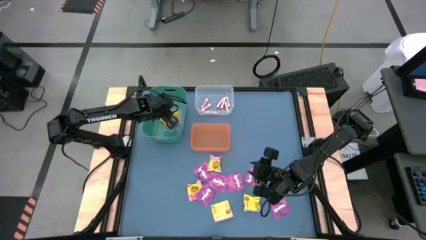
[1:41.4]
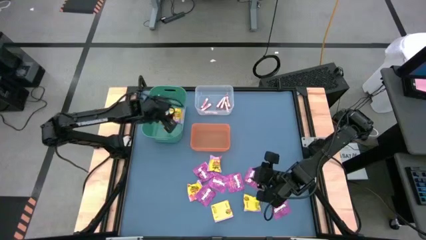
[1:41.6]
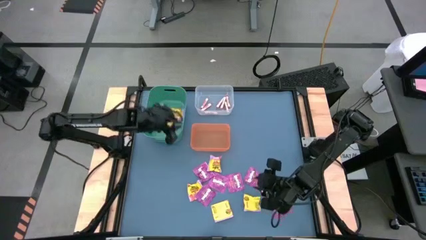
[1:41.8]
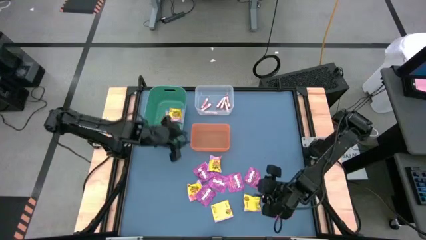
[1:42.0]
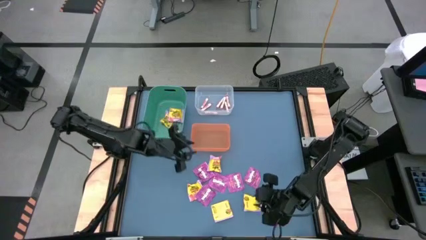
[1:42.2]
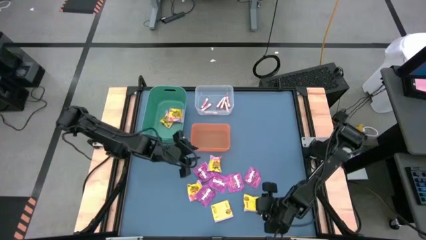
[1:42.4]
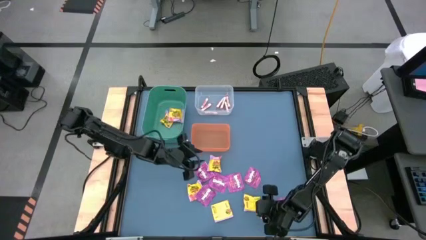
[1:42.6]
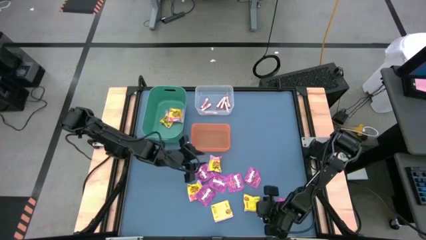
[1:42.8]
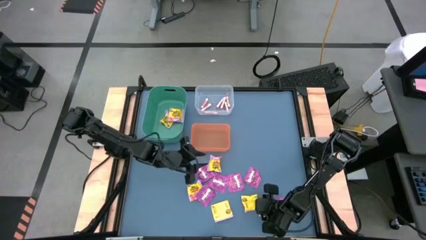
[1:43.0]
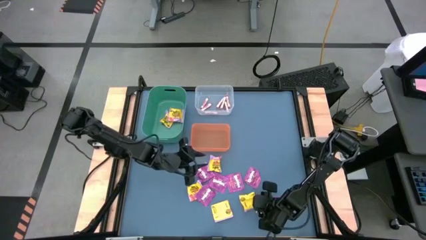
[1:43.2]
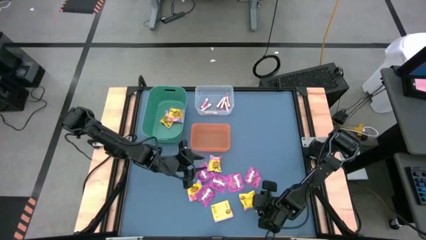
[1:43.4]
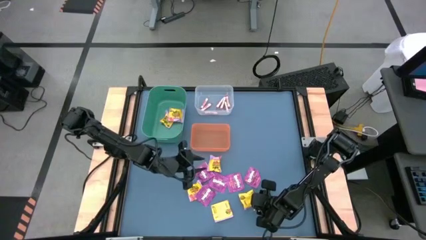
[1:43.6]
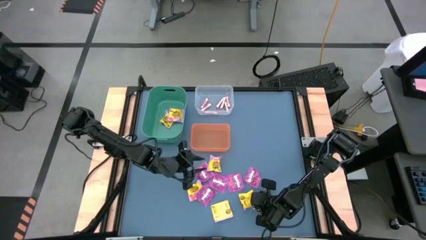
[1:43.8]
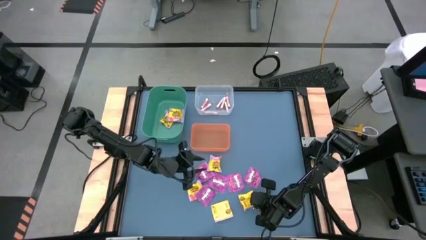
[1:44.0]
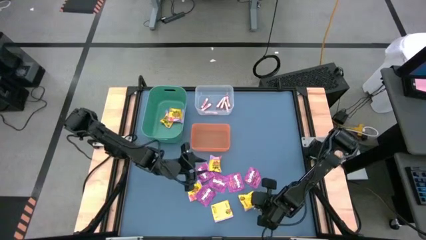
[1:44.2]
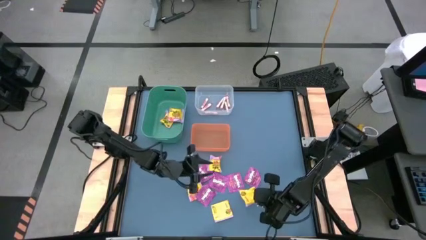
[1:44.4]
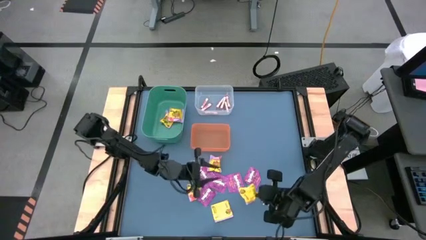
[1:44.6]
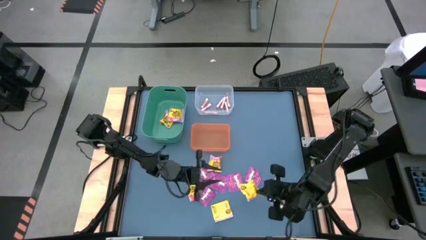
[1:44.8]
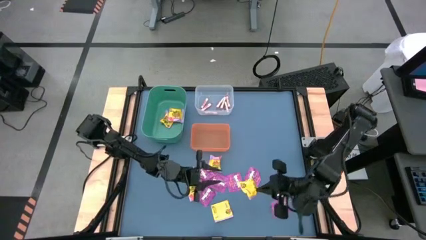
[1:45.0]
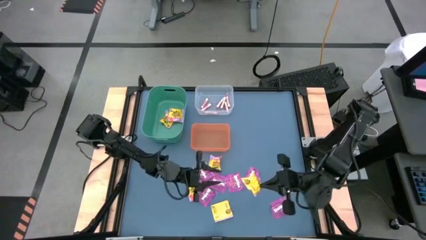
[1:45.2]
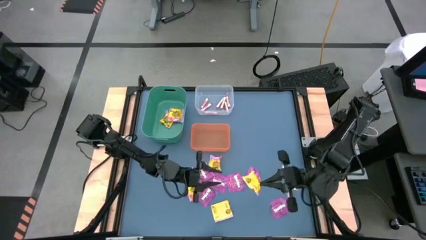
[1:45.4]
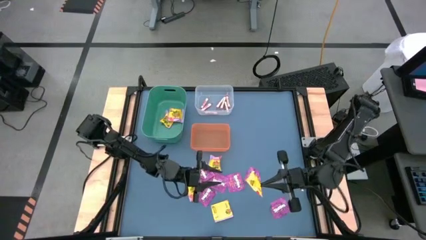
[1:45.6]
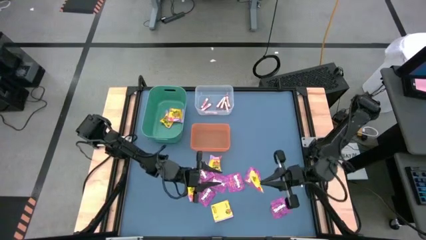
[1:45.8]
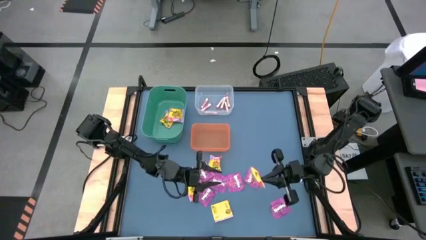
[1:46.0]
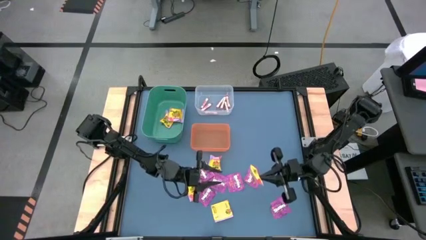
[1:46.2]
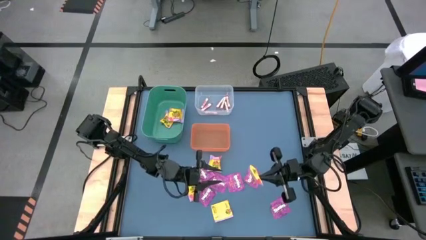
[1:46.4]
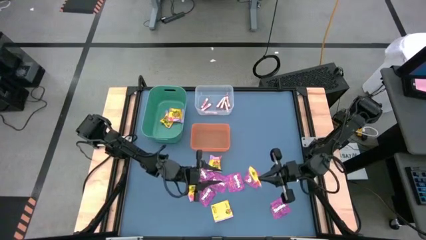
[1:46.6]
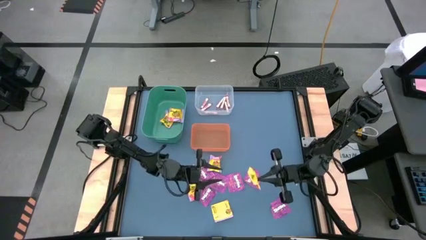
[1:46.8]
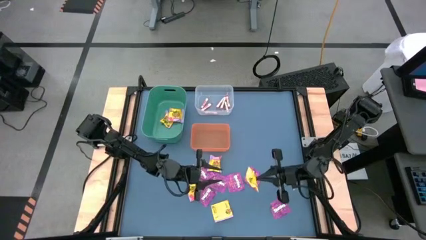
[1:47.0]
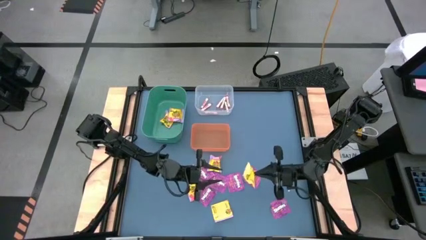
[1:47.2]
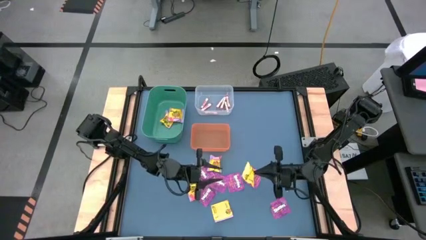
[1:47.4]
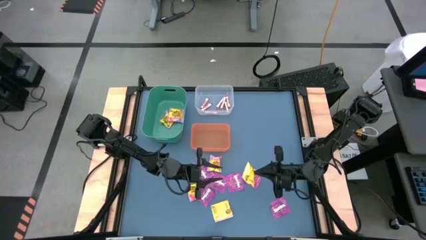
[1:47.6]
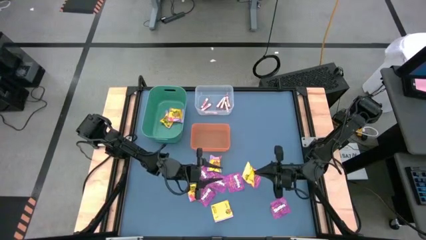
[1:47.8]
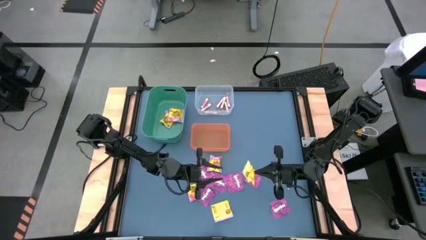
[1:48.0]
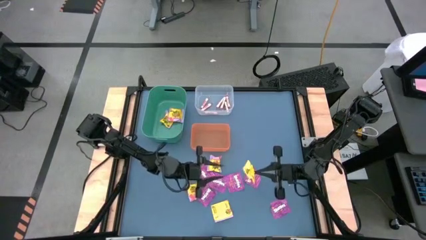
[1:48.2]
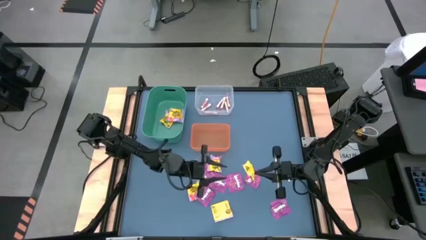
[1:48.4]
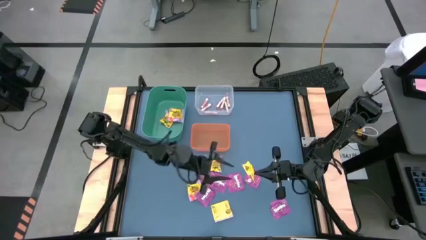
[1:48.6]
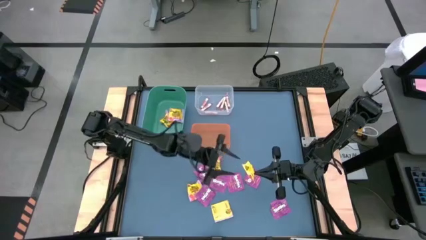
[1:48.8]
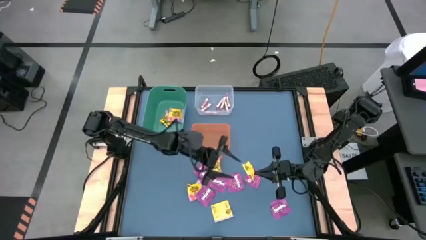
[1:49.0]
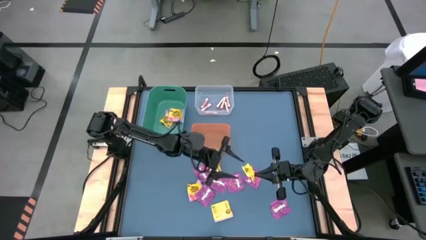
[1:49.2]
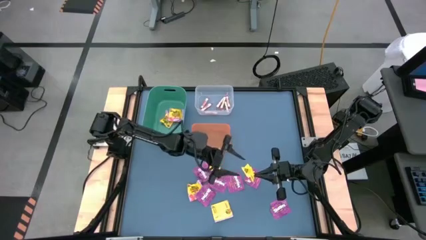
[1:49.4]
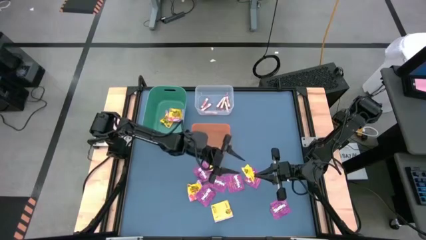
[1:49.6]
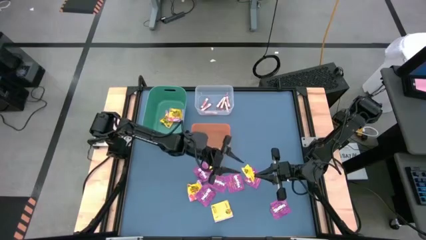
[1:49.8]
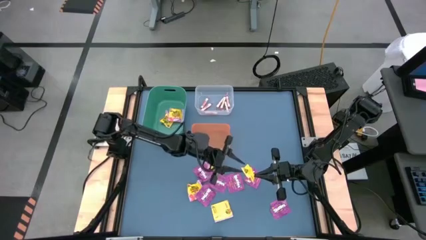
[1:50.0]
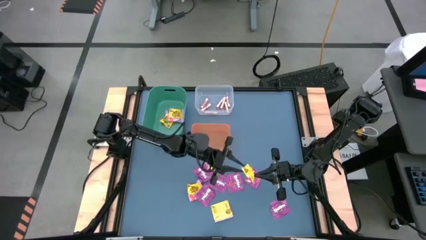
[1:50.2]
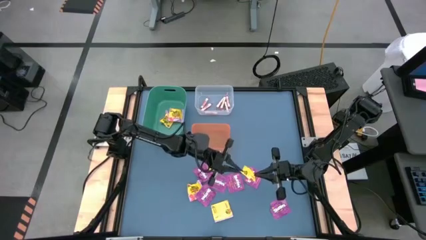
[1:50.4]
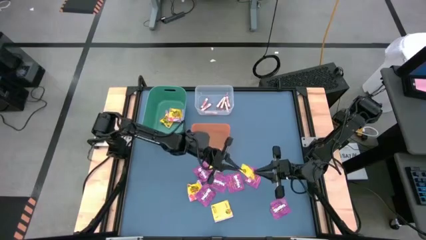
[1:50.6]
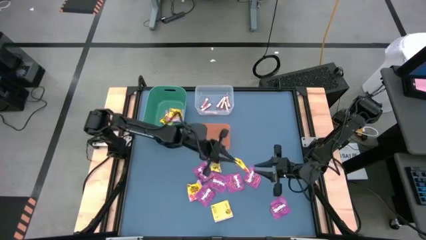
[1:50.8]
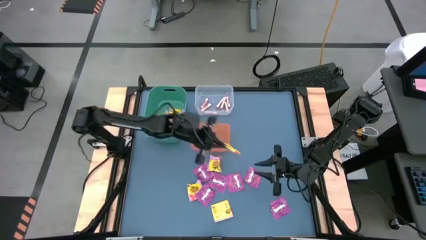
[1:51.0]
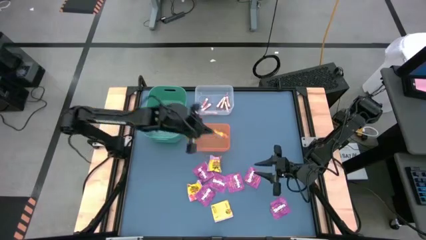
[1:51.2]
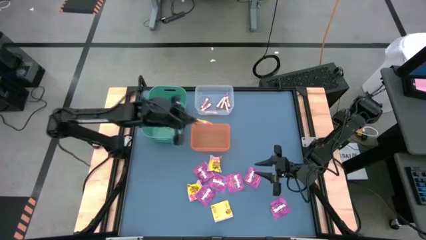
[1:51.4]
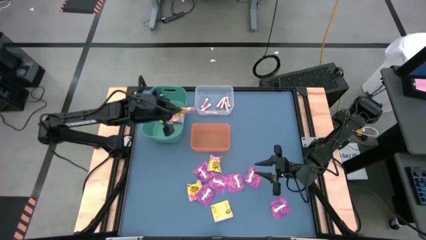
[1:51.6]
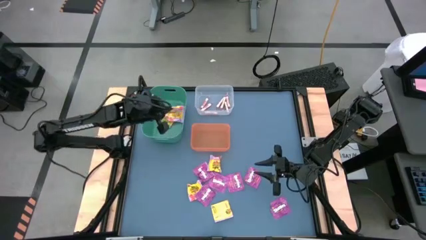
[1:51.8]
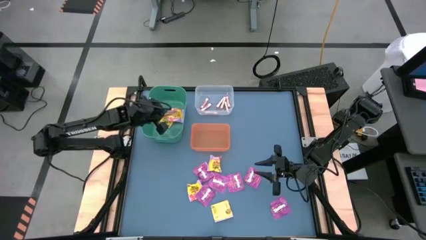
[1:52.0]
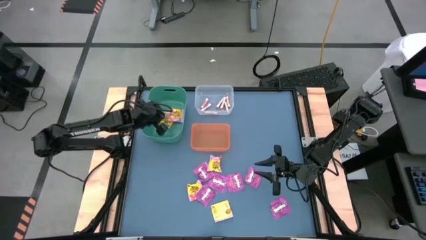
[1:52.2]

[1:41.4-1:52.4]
Task: Sort candy
Put the yellow candy into the green bin

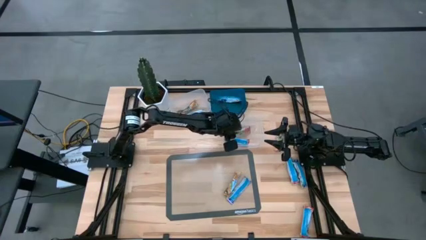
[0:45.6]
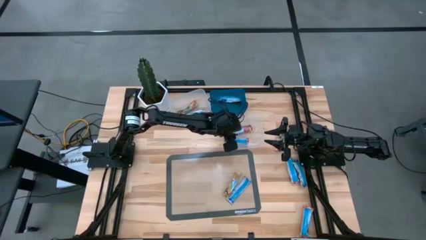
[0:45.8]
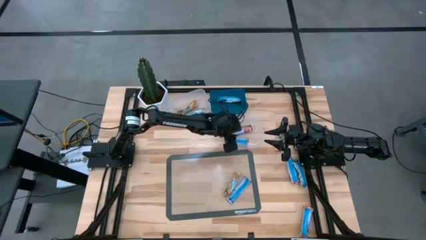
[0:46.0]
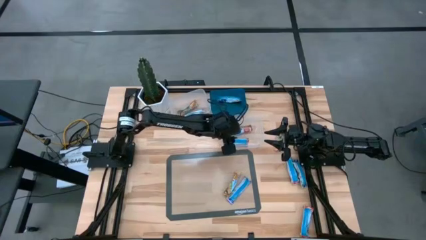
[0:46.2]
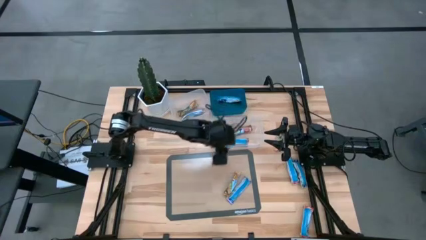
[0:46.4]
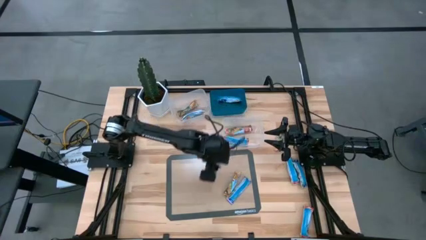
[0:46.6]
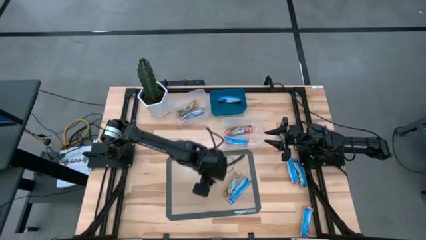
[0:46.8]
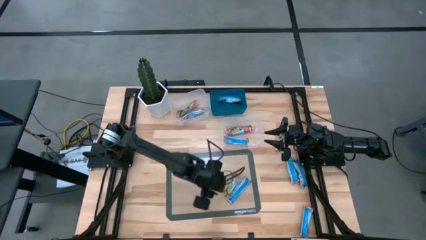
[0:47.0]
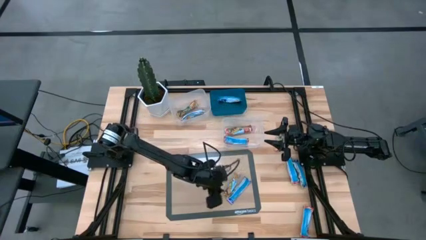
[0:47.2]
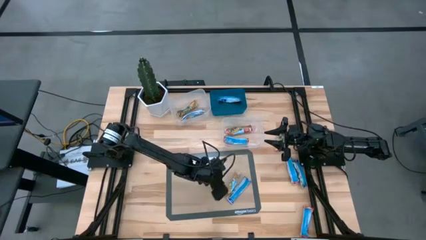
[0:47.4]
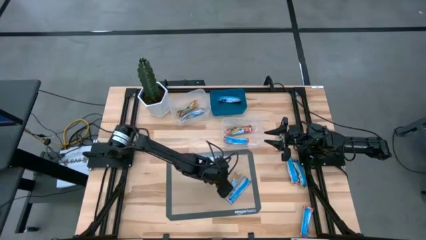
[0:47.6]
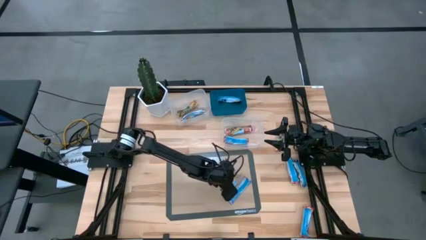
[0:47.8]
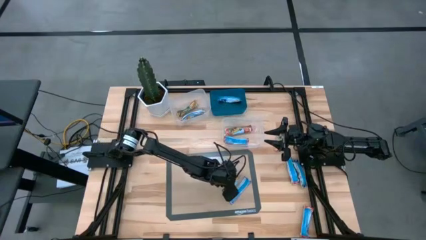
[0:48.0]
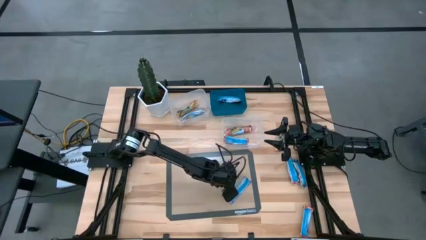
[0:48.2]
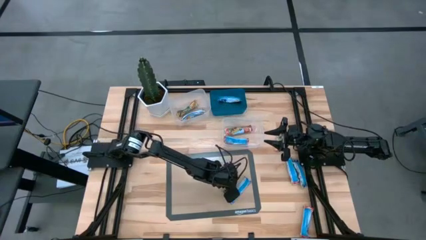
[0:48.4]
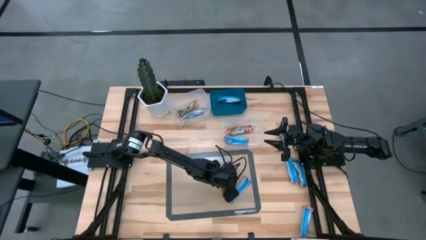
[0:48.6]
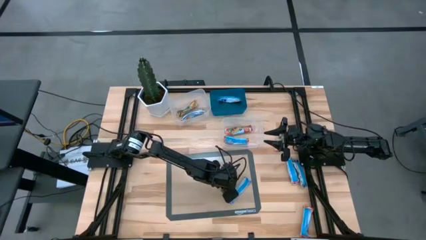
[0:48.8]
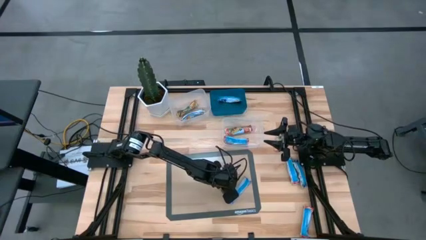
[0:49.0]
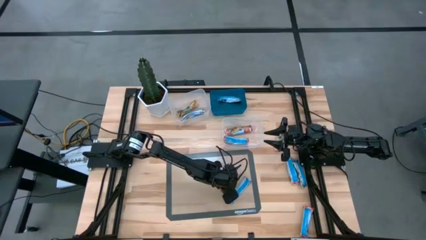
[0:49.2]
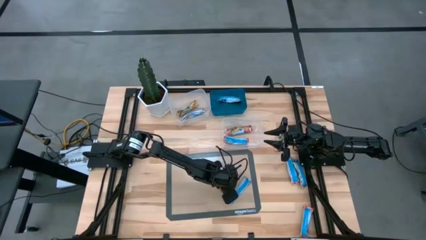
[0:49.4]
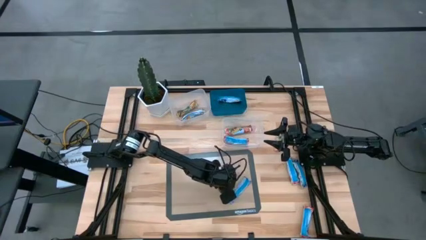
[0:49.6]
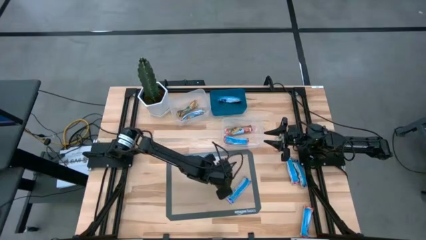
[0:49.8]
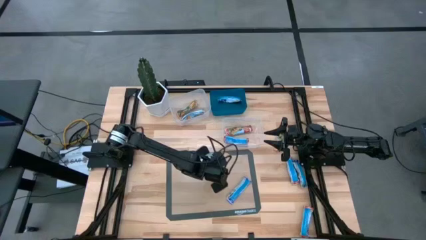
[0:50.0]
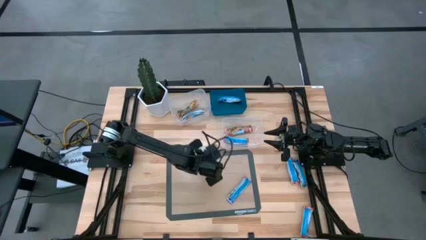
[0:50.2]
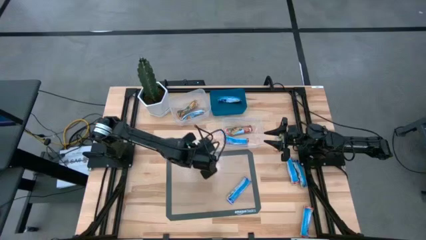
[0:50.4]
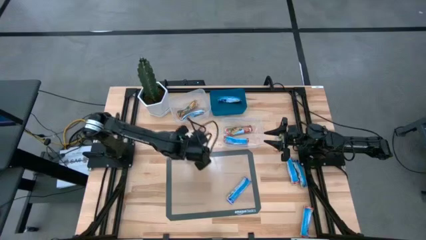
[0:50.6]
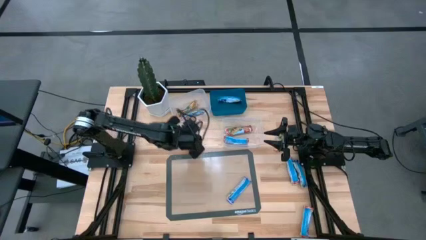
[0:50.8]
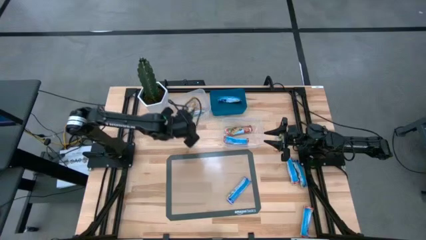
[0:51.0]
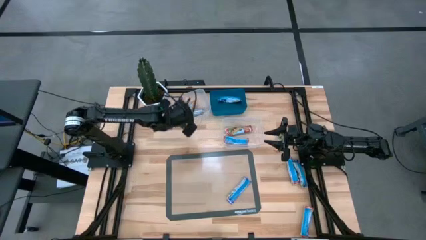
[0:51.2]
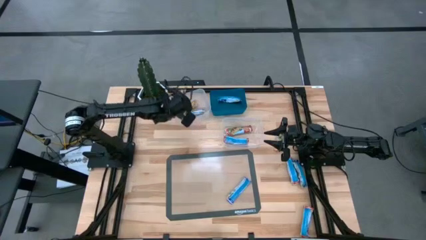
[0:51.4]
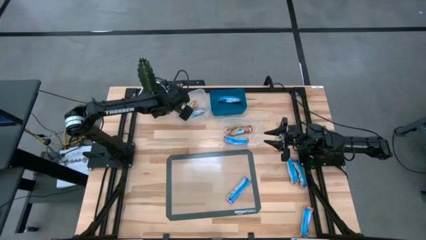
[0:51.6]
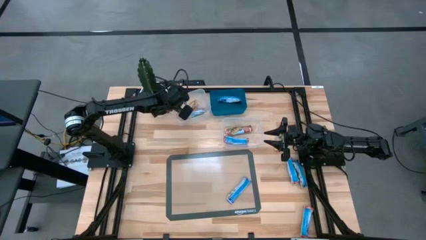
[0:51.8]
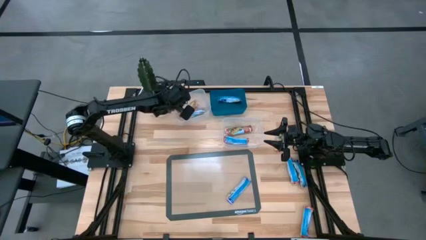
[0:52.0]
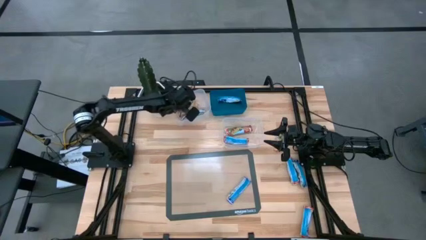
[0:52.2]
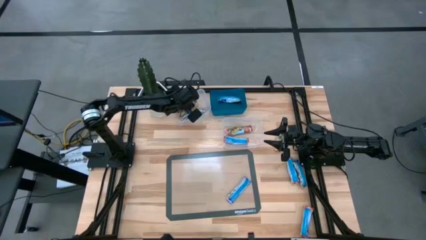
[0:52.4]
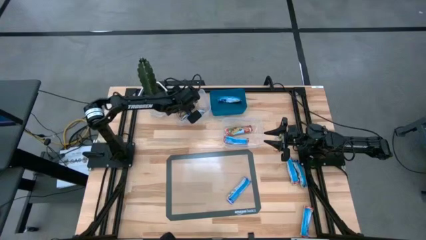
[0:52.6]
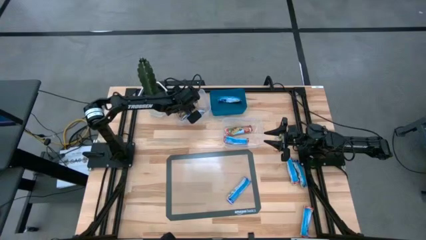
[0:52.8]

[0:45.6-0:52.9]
Task: Pick and place Granola Bars by type
Put the yellow granola bar into the top transparent bin
